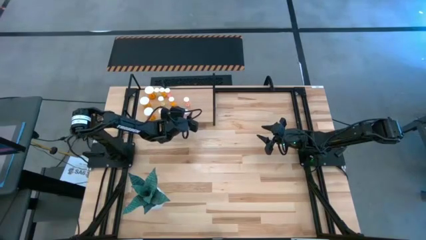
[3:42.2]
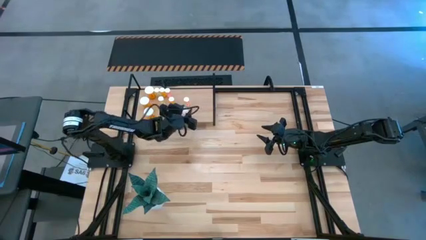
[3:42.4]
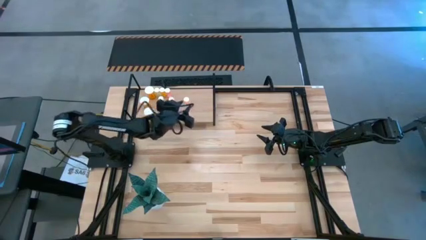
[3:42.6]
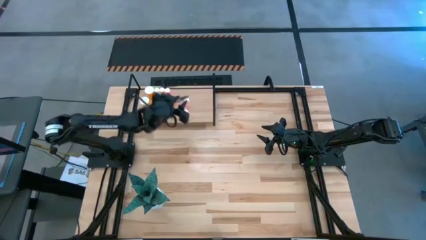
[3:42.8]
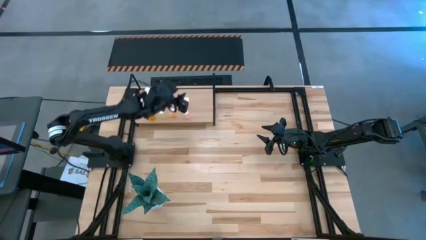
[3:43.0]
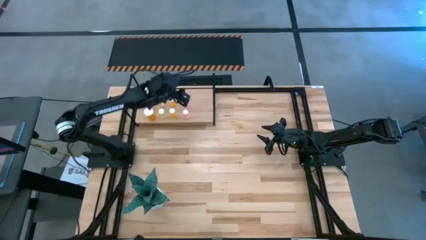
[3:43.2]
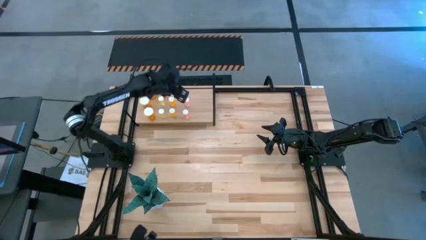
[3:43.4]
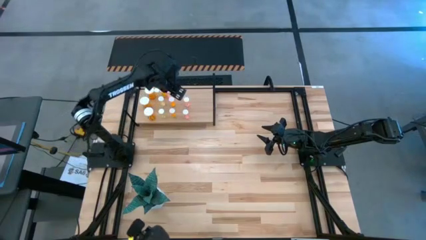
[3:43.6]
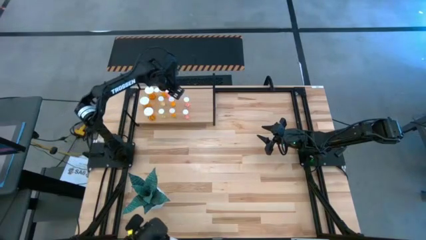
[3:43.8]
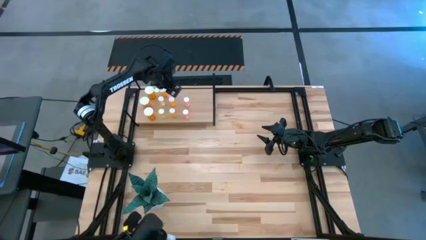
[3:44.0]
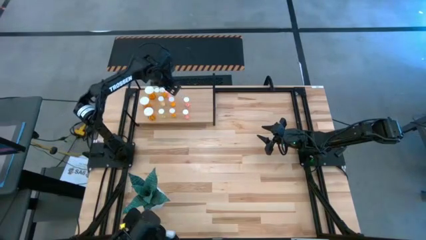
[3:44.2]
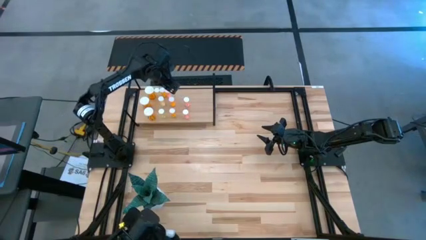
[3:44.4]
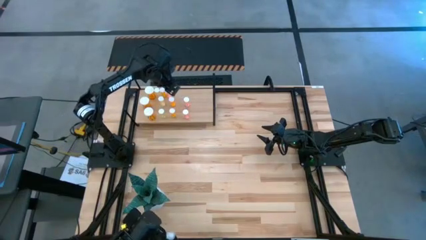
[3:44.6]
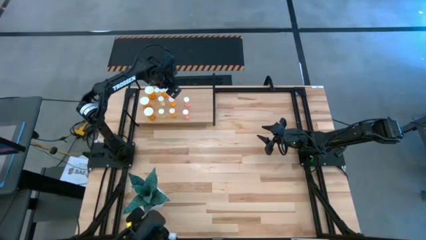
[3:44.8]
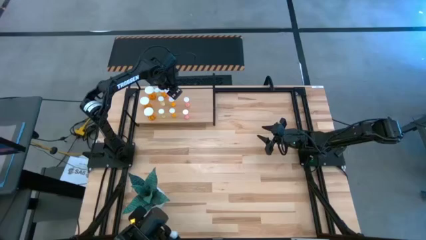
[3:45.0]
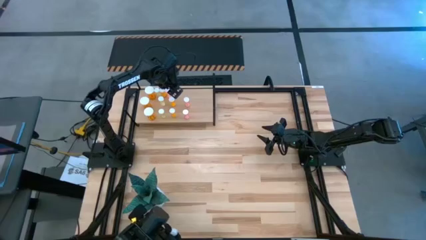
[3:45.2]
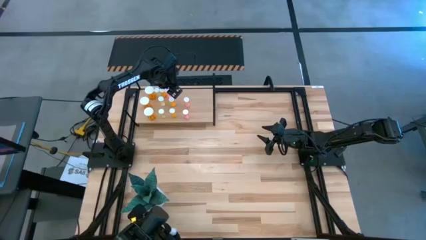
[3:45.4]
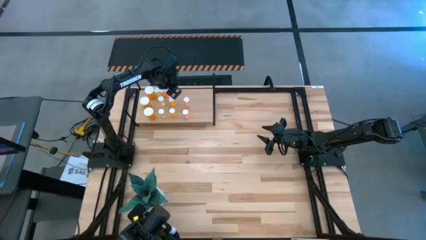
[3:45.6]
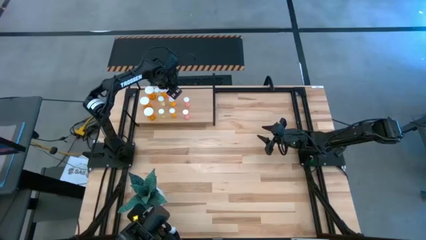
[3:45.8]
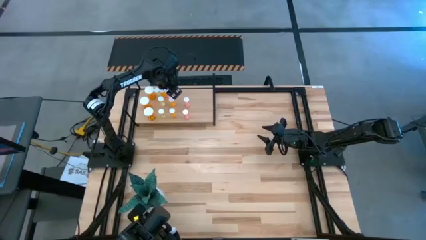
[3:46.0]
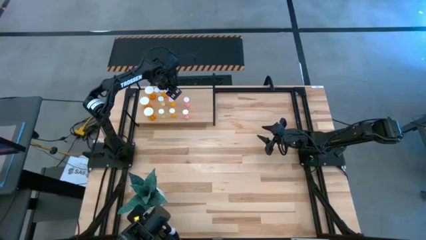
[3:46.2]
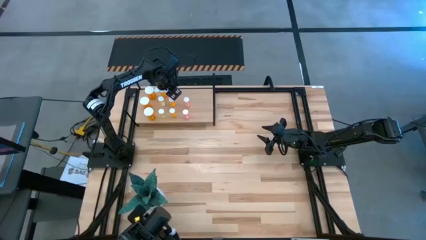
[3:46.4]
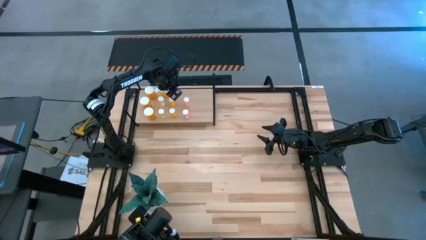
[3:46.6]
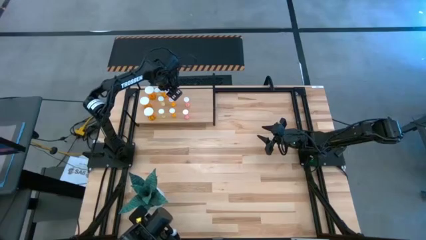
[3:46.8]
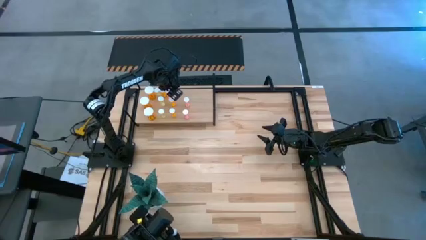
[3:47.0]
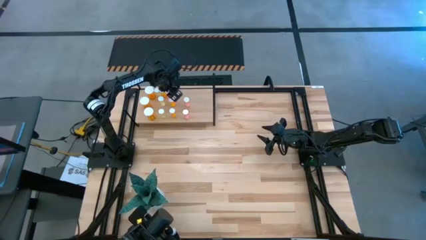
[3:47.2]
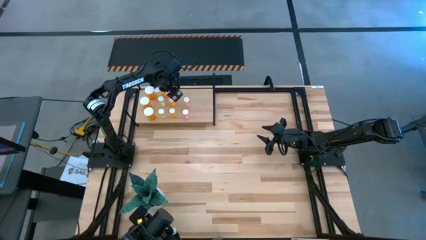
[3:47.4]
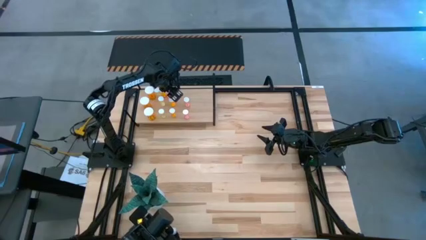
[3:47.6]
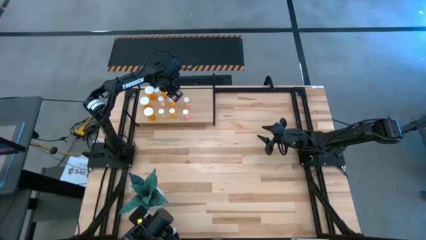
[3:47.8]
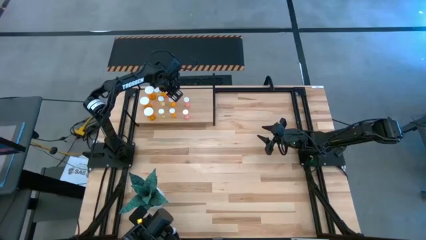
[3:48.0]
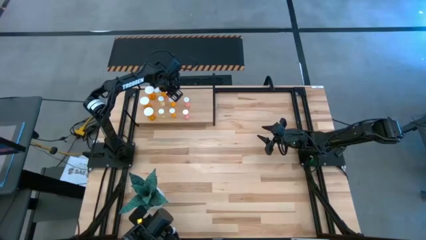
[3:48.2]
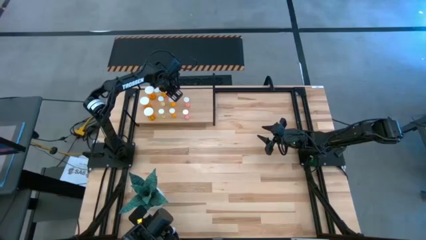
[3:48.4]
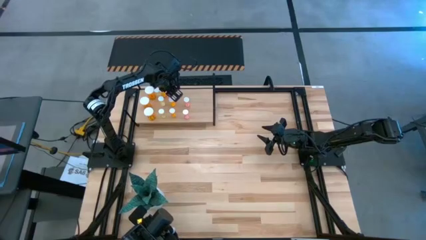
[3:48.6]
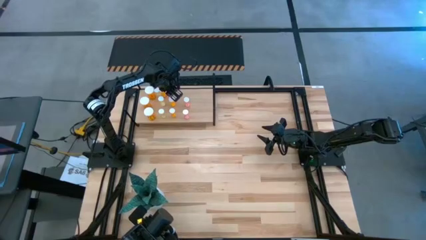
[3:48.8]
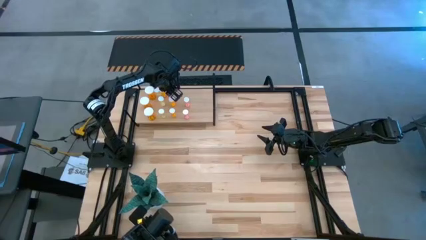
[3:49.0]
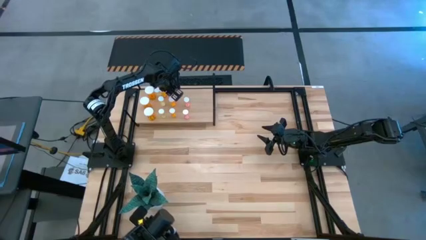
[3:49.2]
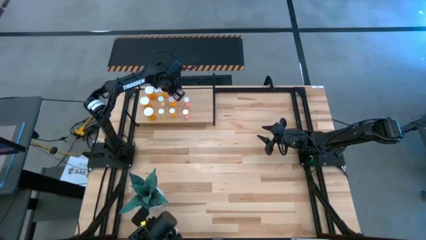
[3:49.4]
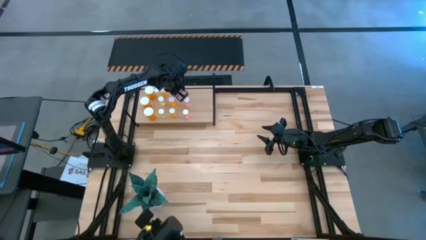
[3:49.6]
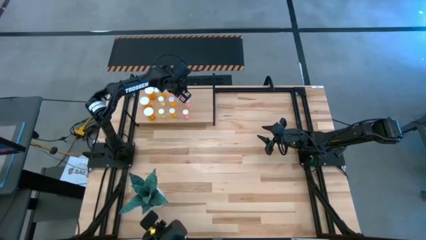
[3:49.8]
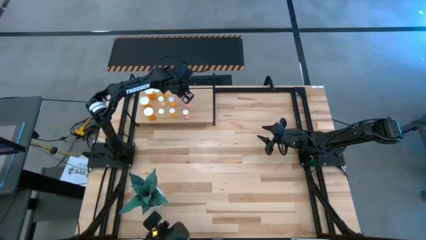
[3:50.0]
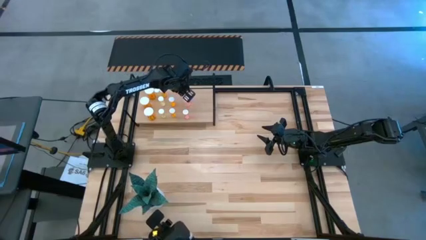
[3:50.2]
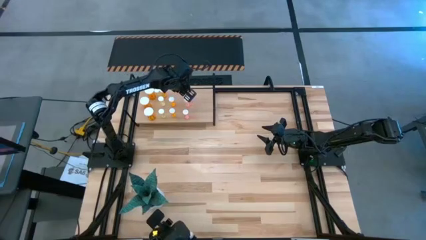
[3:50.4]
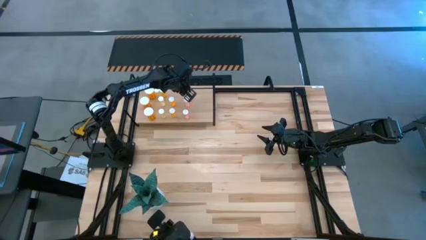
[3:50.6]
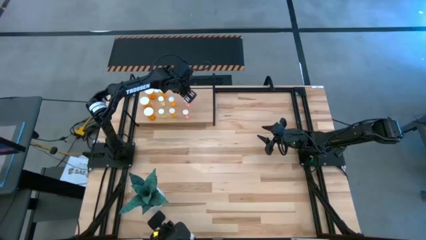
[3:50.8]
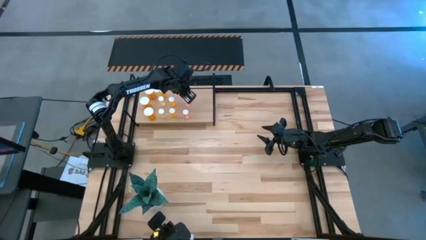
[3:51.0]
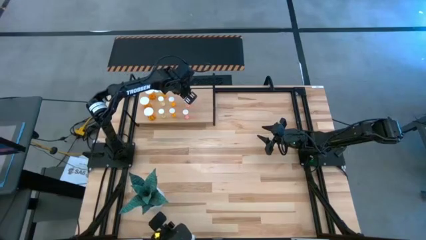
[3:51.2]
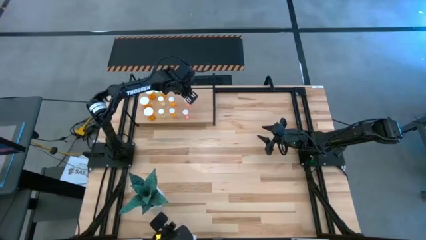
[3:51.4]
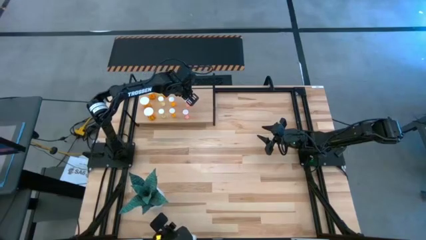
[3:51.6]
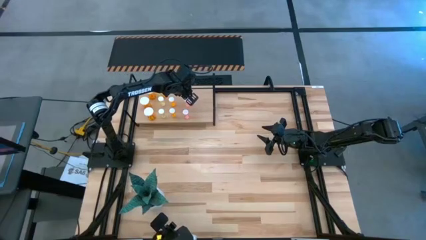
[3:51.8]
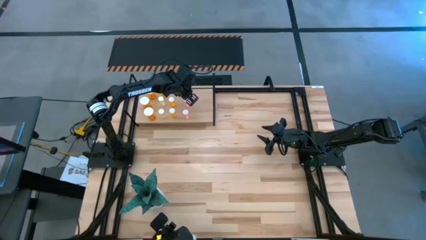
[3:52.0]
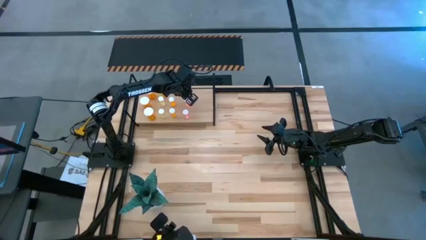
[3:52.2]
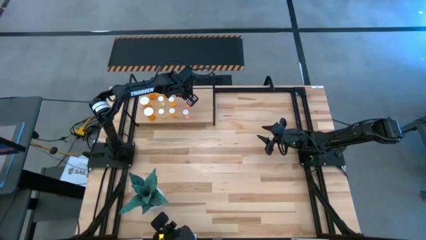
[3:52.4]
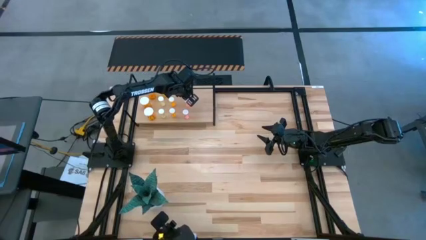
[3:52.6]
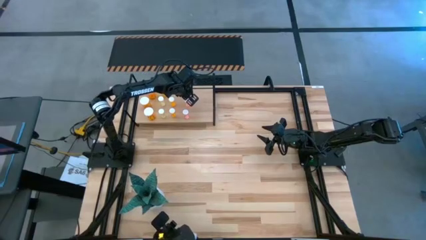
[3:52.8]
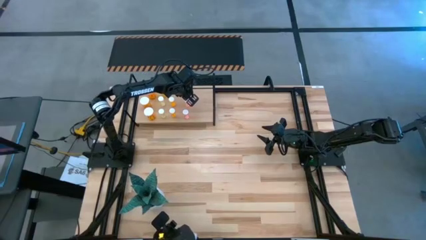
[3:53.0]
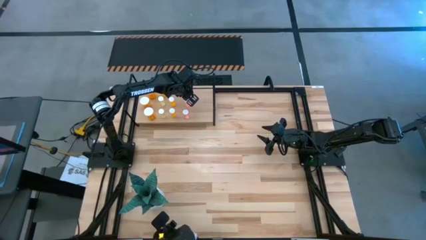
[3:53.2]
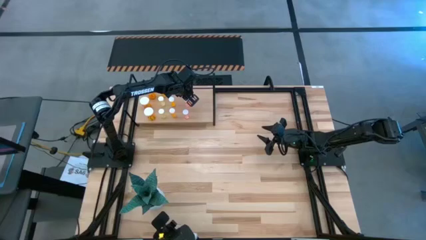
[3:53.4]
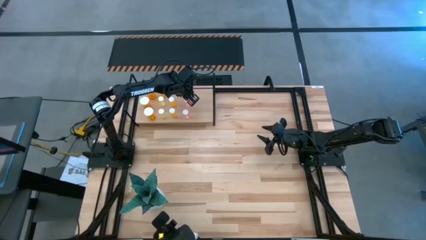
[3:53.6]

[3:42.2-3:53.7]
Task: Pick and place medicine bottles onto shelf by color
Adjust the pink pill bottle on the shelf

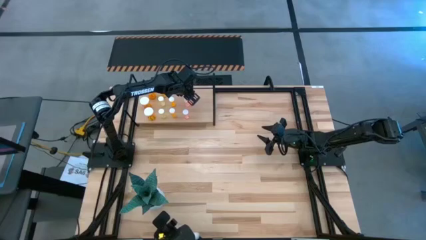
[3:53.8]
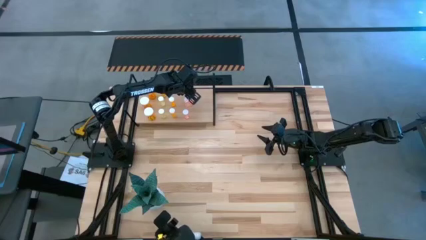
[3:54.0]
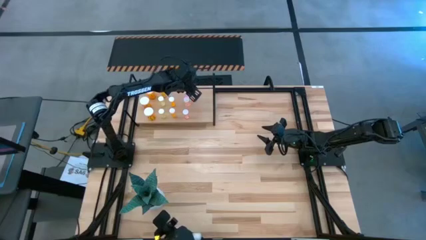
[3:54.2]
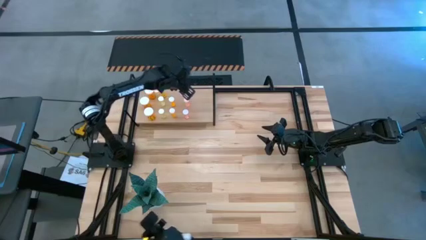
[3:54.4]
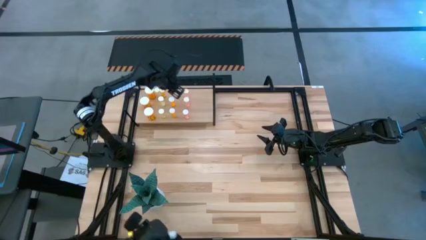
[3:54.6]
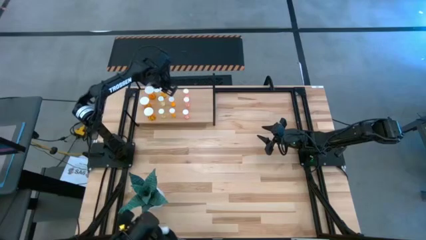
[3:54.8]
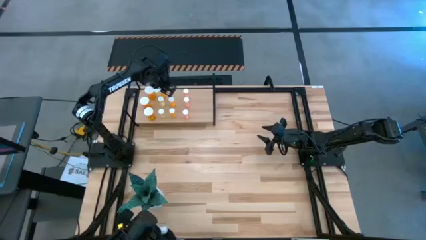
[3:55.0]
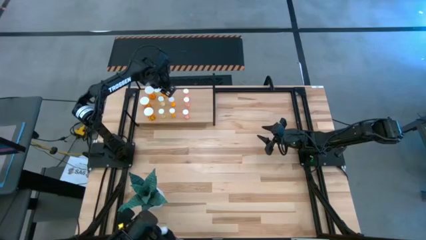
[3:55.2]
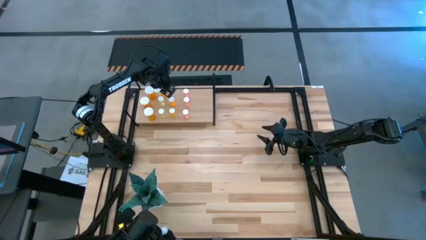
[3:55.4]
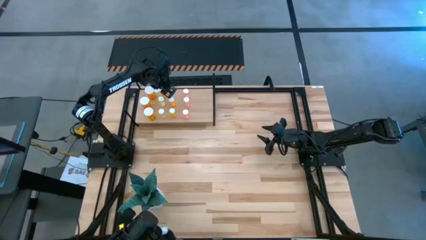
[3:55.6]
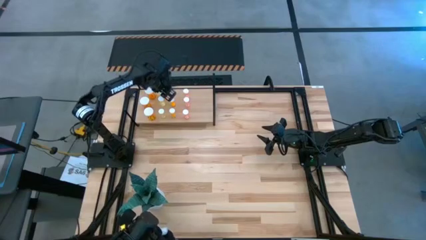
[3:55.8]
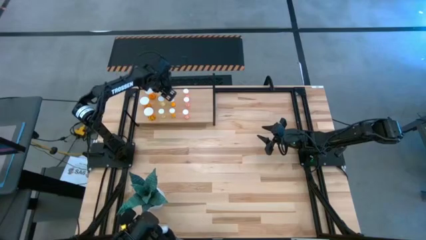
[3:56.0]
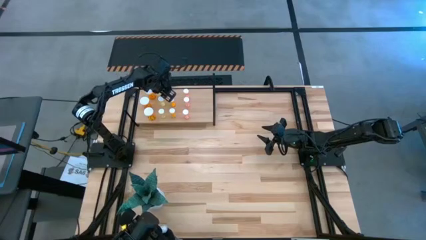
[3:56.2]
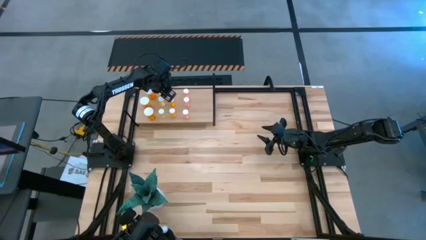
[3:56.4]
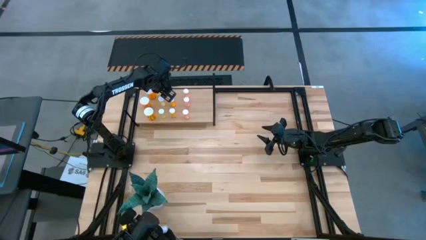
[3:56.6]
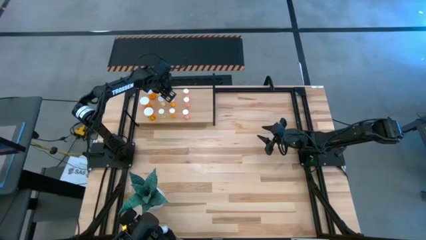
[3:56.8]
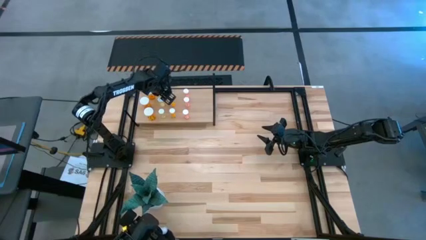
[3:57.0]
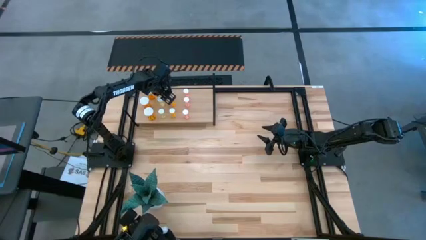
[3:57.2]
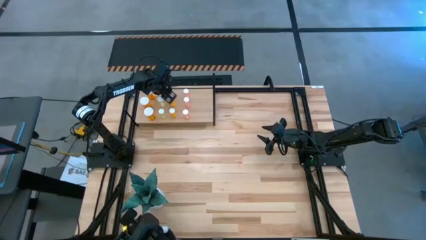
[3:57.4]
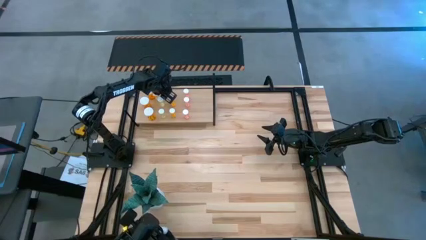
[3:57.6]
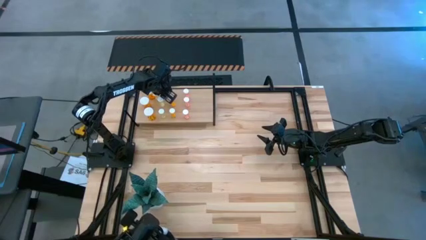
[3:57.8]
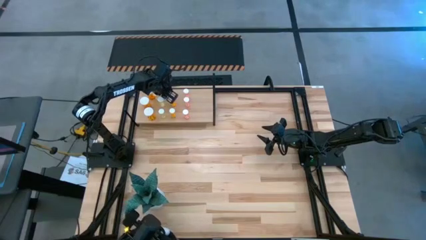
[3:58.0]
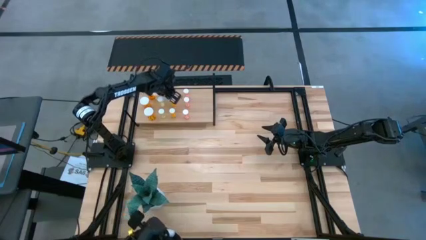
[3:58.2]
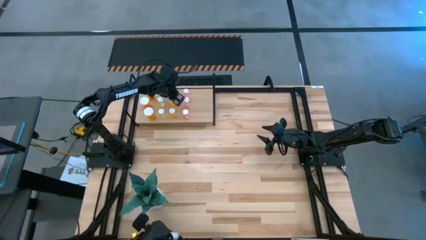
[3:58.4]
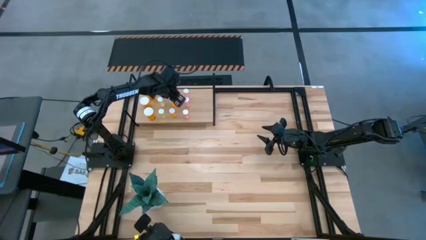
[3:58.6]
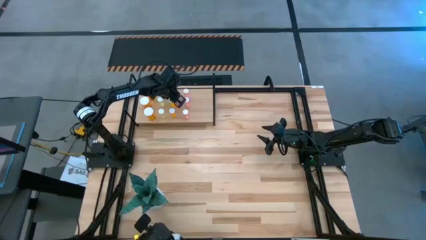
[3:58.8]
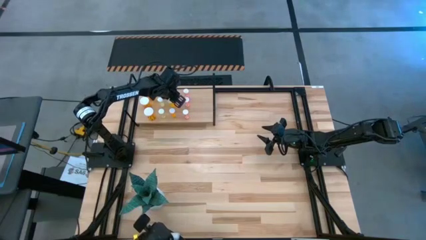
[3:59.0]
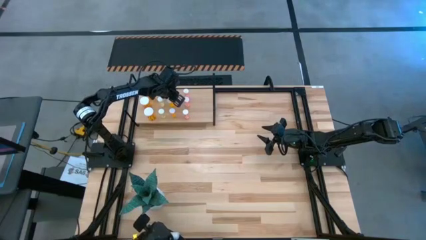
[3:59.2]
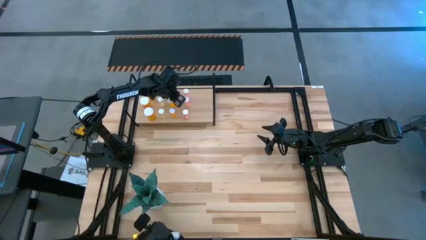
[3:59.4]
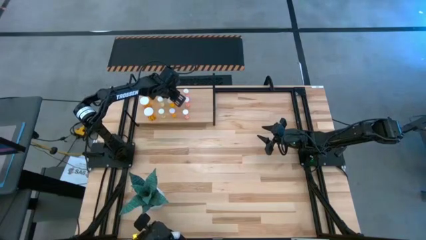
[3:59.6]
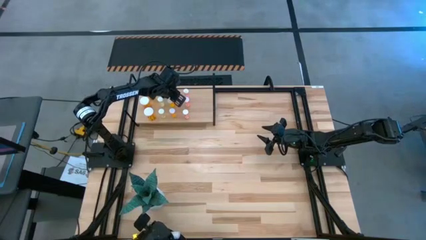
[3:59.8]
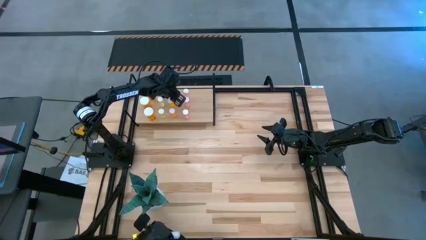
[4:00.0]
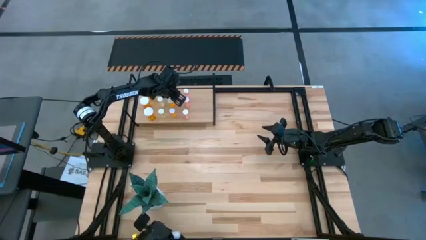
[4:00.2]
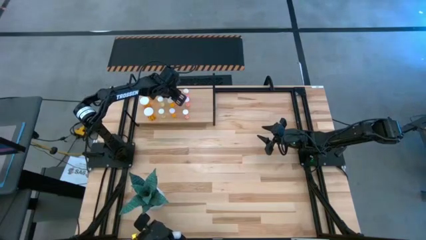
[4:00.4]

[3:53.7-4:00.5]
Adjust the orange pill bottle on the shelf
